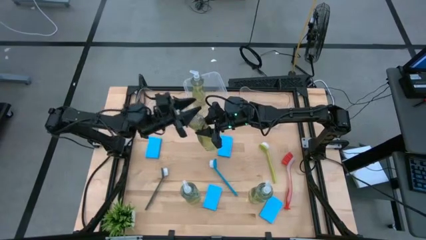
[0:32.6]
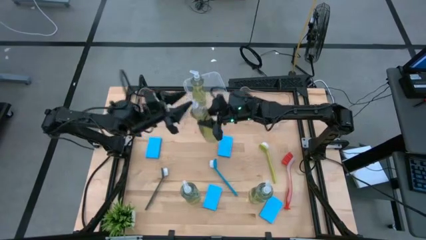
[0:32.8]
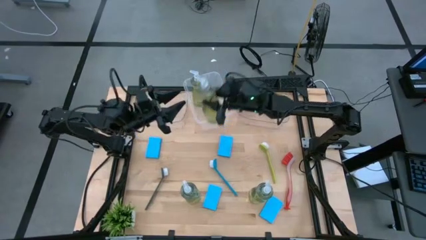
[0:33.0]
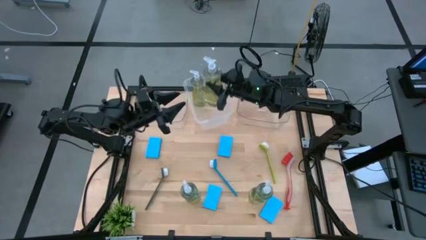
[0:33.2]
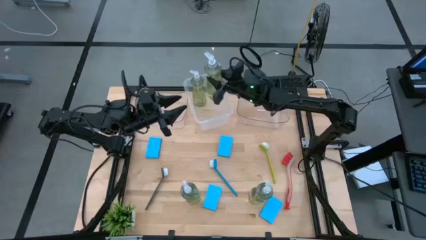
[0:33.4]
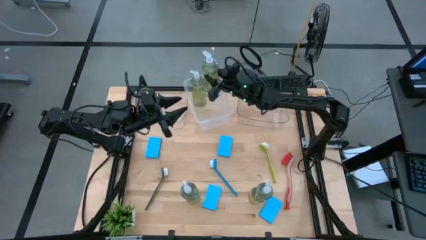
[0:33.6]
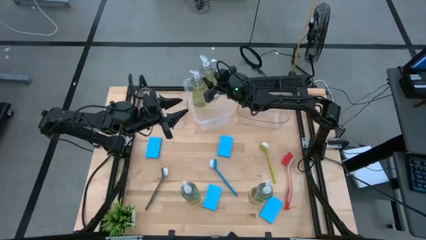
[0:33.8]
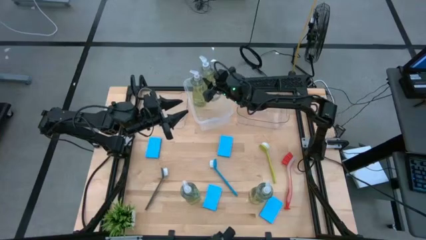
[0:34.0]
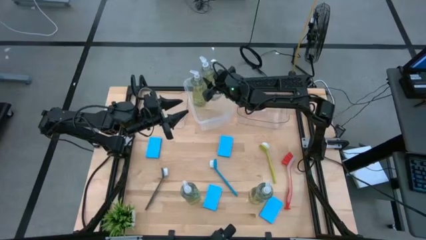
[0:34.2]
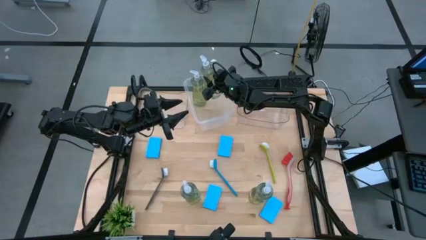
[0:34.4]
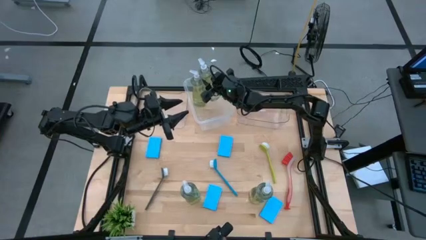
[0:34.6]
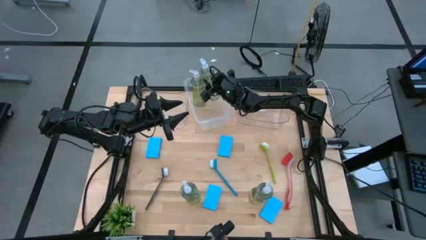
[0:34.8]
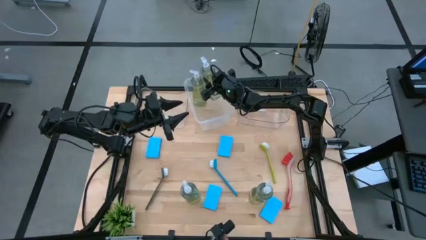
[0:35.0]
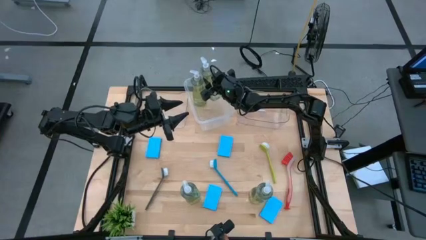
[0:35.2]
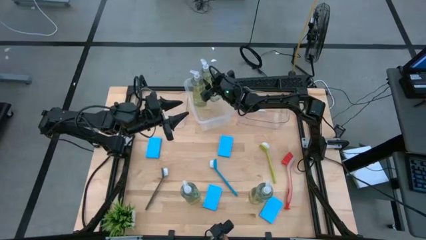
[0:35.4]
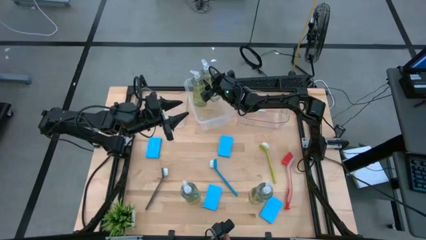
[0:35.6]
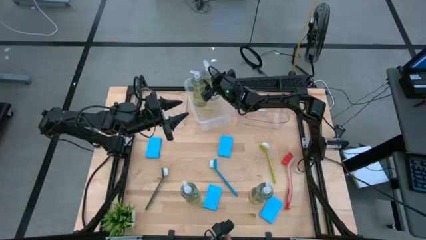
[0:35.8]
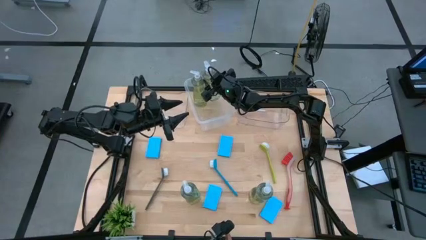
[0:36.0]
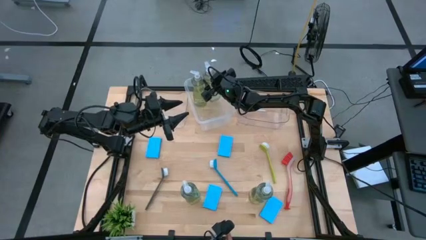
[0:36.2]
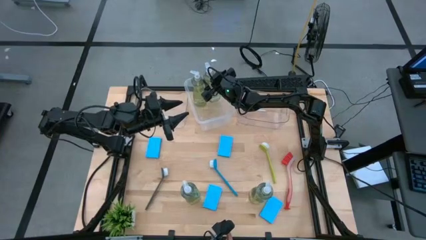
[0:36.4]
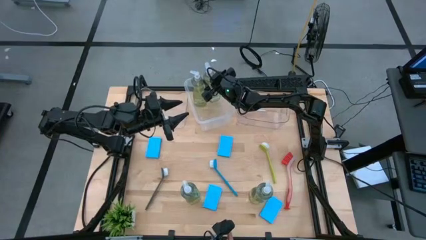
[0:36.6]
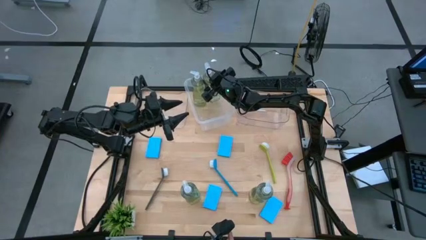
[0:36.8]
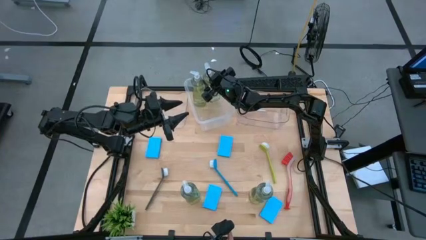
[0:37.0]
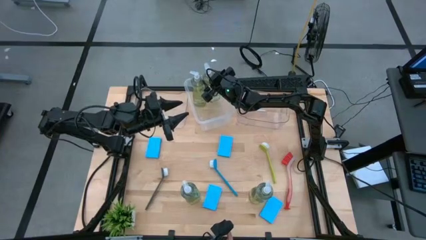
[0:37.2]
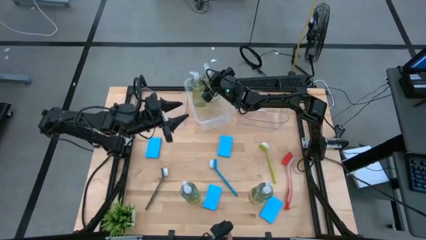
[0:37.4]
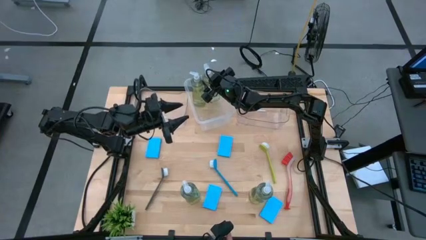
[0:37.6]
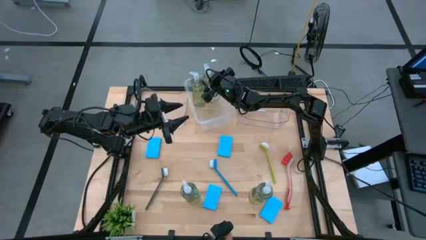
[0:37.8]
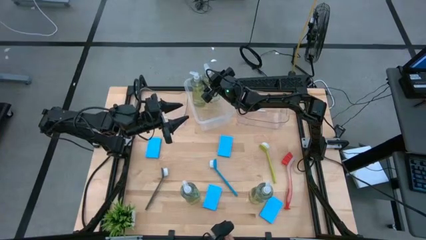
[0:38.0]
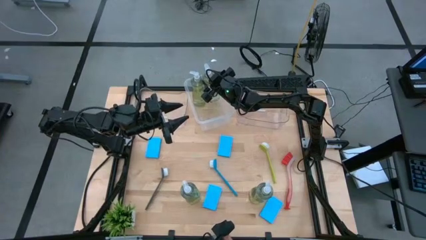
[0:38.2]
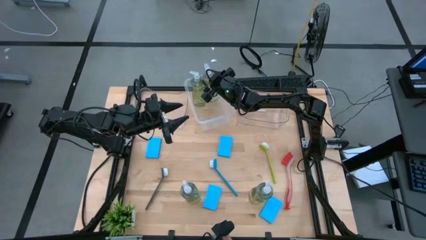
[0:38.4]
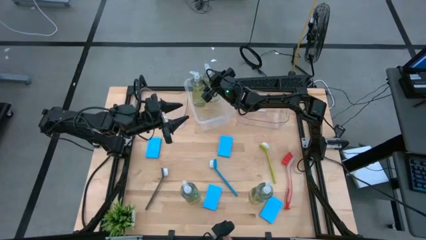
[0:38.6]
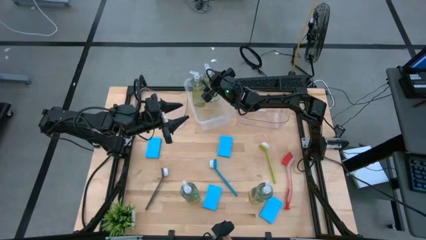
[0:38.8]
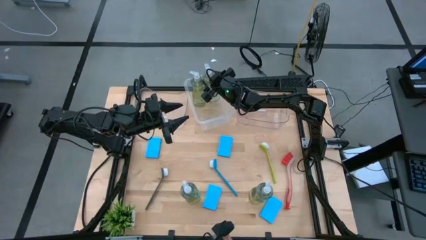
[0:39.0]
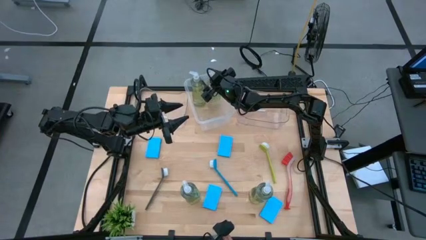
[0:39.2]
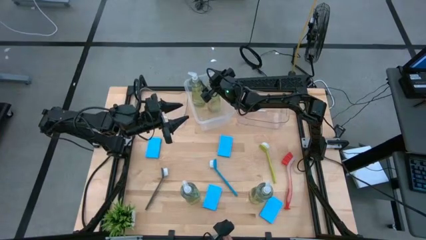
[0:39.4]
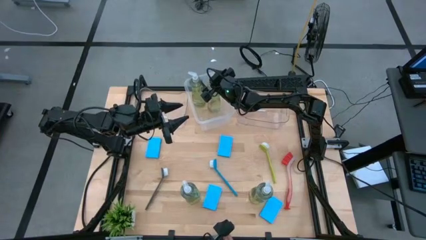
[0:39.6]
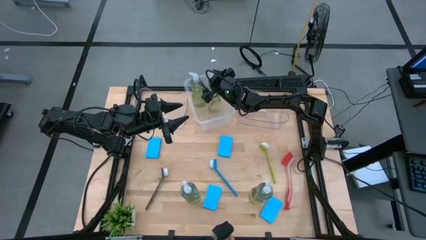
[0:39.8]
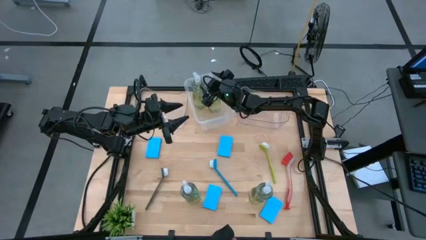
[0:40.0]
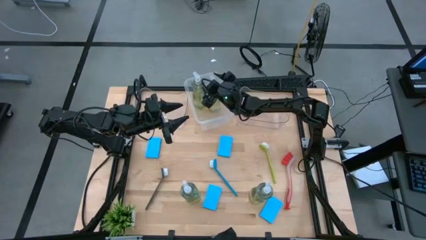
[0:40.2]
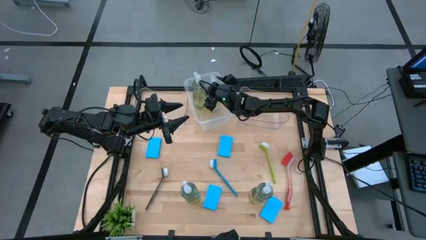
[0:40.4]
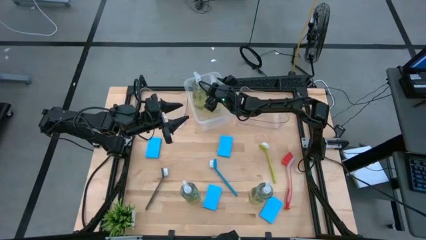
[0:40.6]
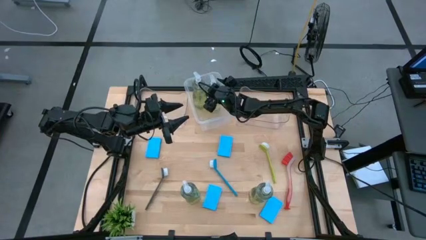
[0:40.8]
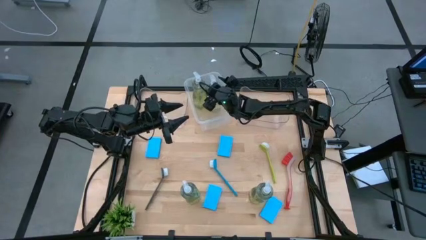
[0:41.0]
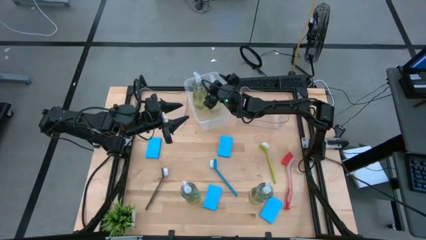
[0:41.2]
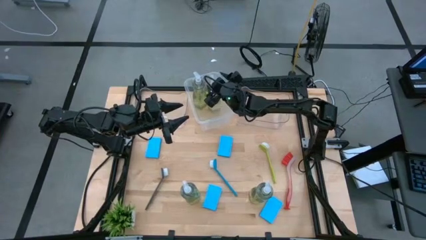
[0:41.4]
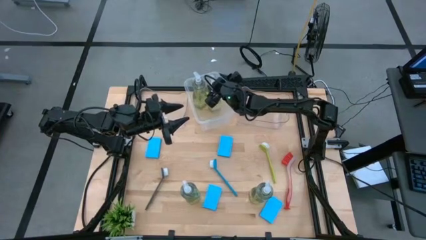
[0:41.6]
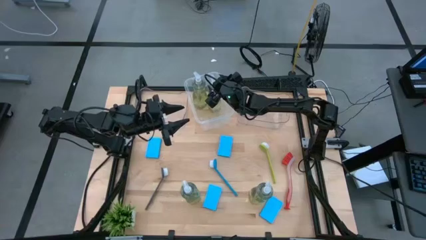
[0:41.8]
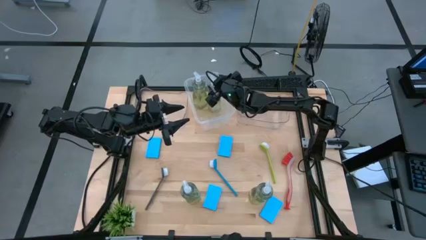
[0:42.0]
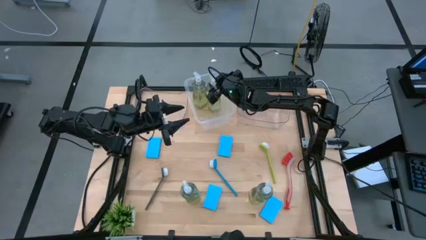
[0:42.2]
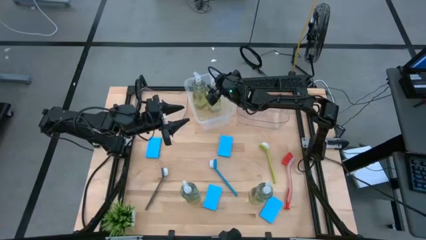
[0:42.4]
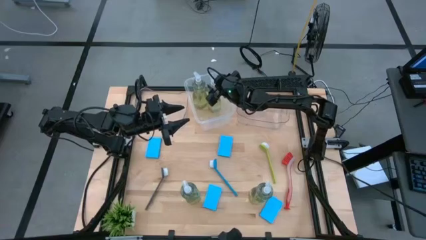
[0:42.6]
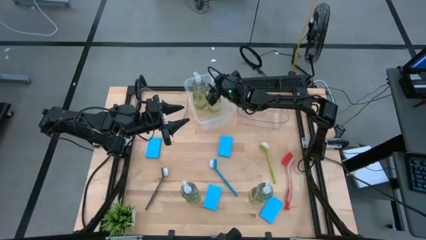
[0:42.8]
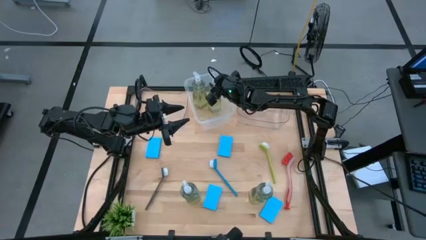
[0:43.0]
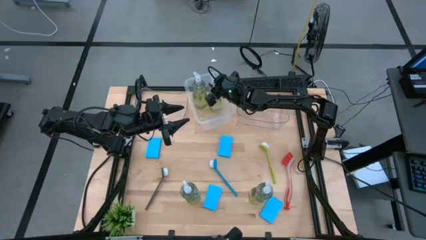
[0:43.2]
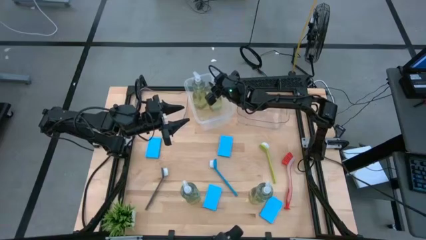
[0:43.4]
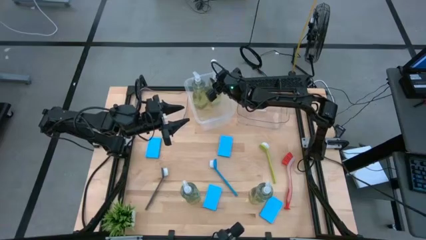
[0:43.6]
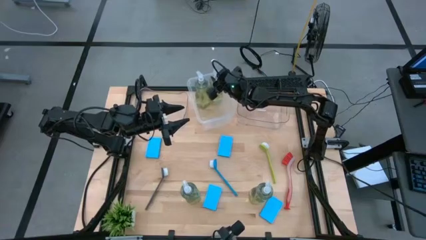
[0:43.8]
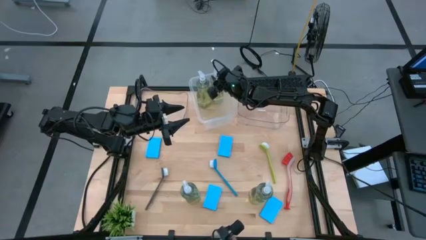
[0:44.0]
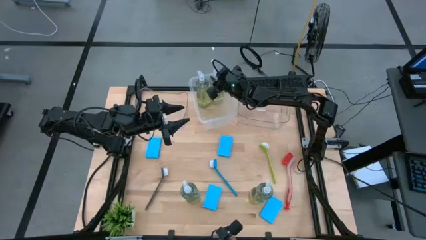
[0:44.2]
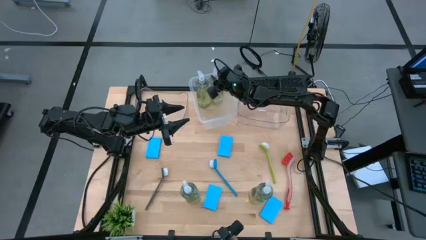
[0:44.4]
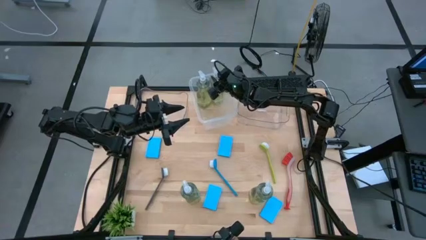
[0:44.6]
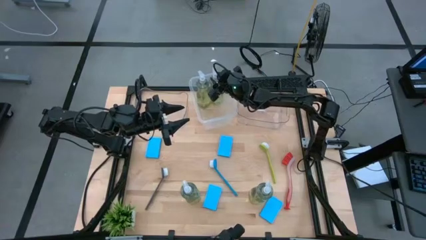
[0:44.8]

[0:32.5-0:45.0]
Task: Pick & Place Kitchen Sink Supplies
Put the dish soap into the white bin
